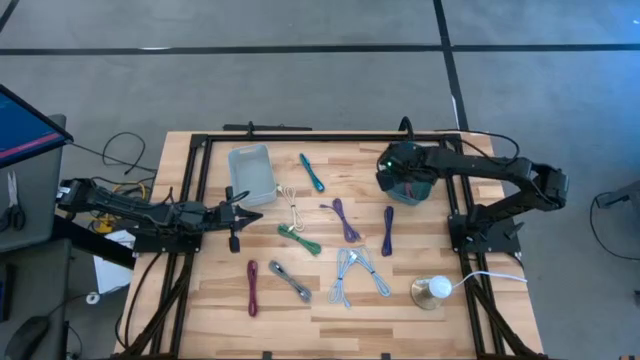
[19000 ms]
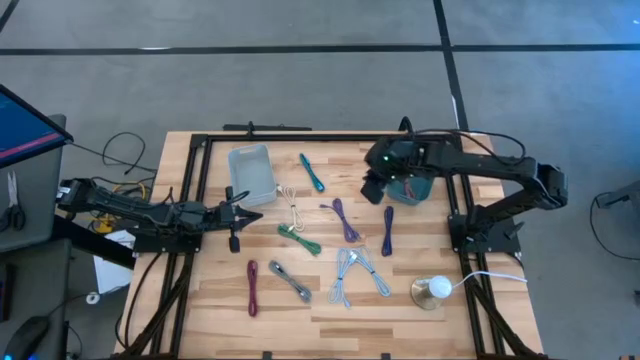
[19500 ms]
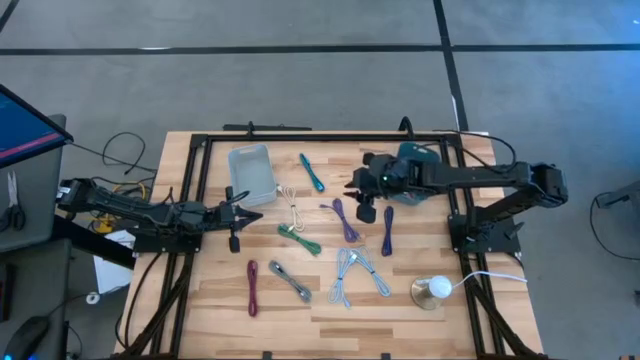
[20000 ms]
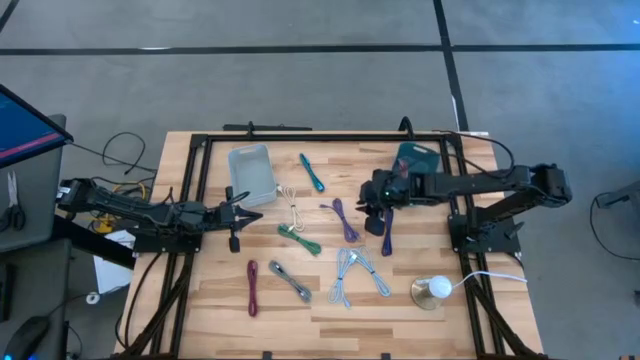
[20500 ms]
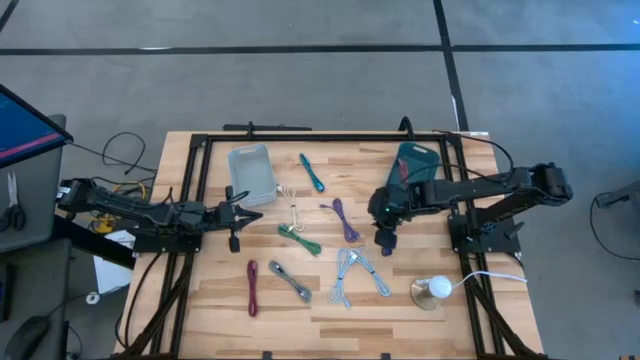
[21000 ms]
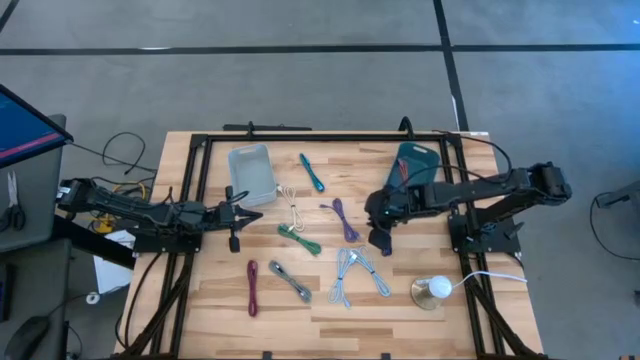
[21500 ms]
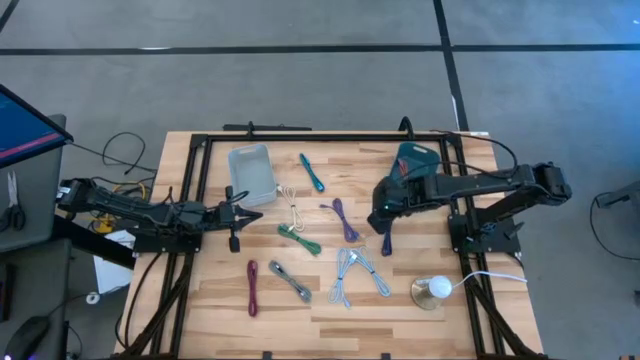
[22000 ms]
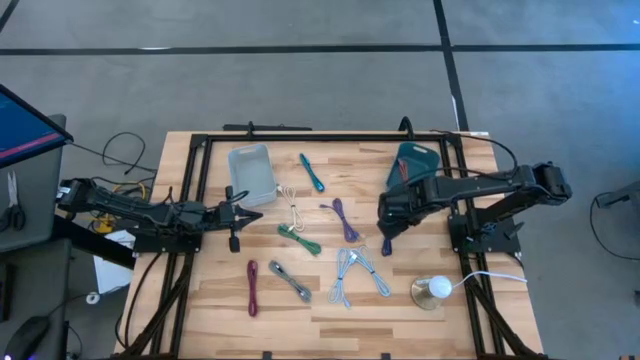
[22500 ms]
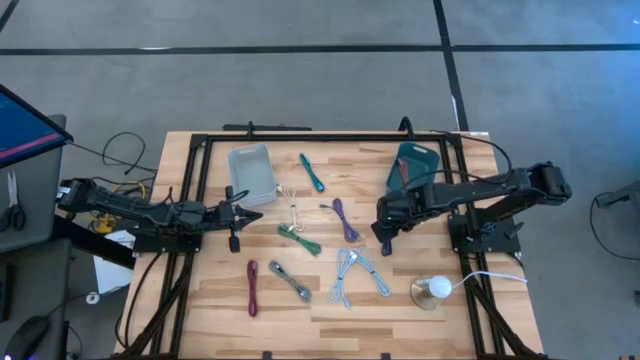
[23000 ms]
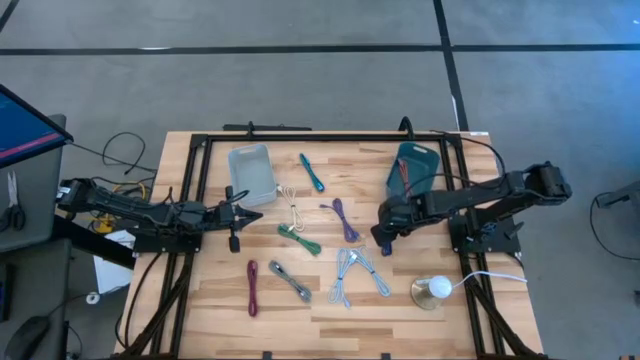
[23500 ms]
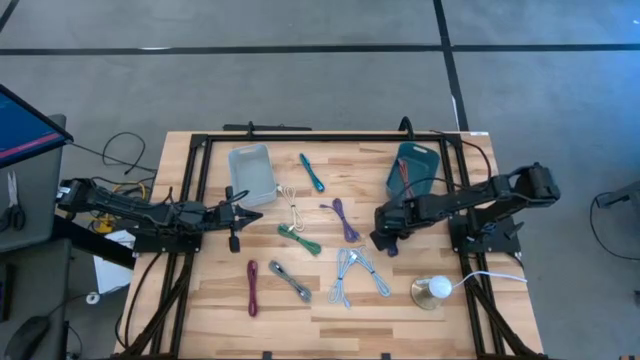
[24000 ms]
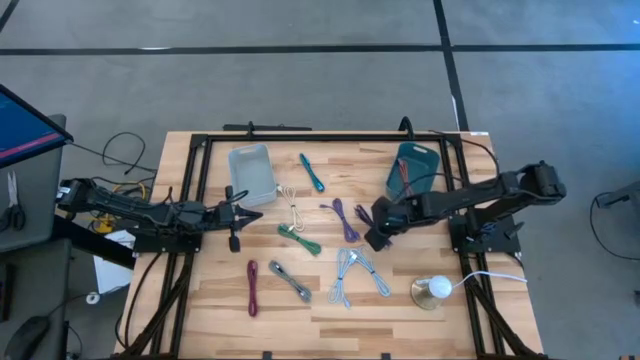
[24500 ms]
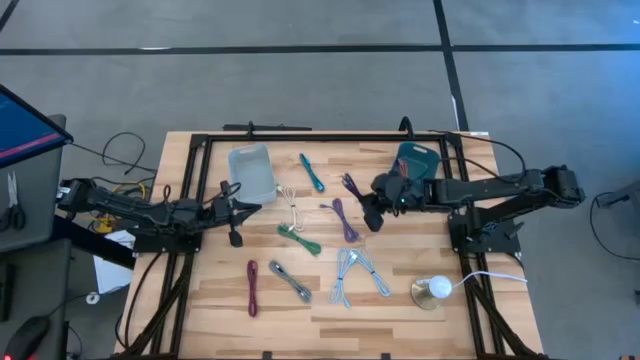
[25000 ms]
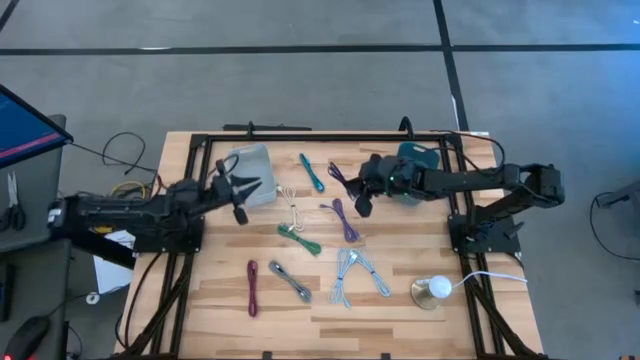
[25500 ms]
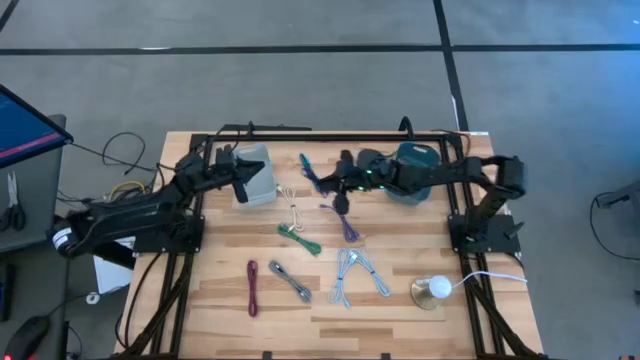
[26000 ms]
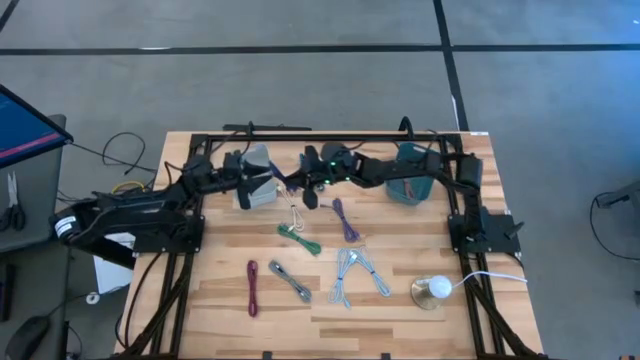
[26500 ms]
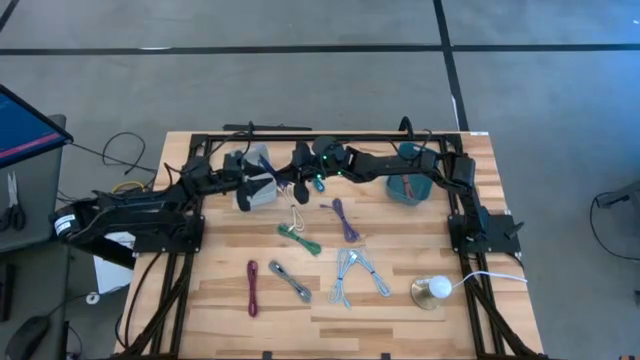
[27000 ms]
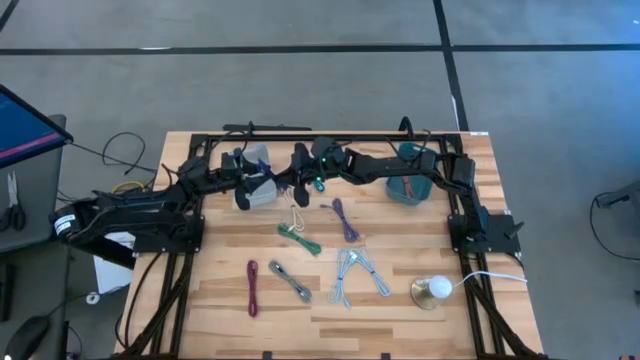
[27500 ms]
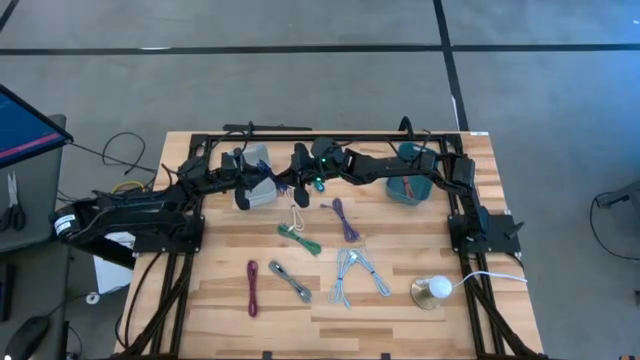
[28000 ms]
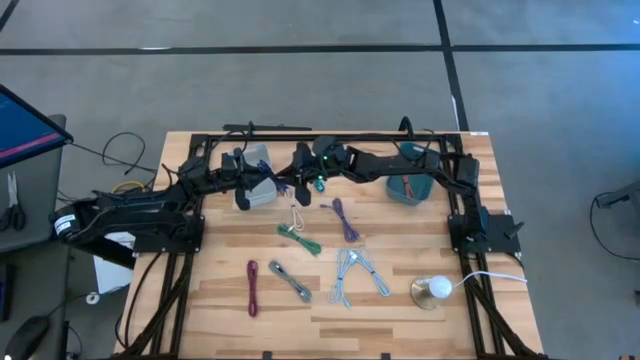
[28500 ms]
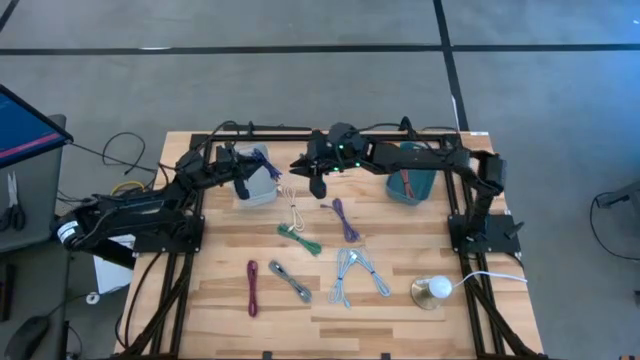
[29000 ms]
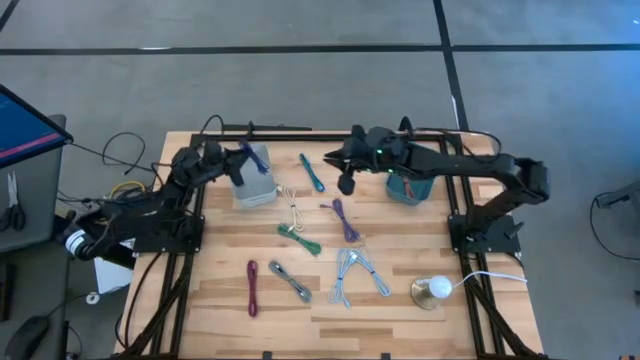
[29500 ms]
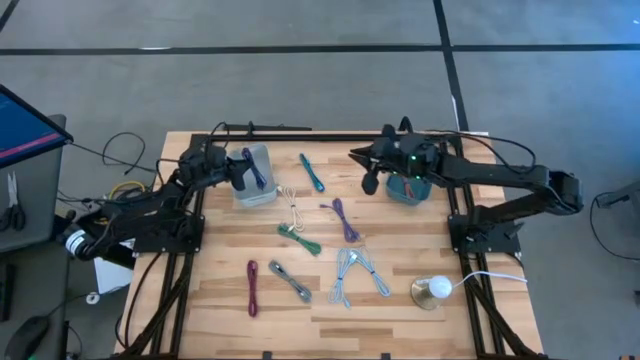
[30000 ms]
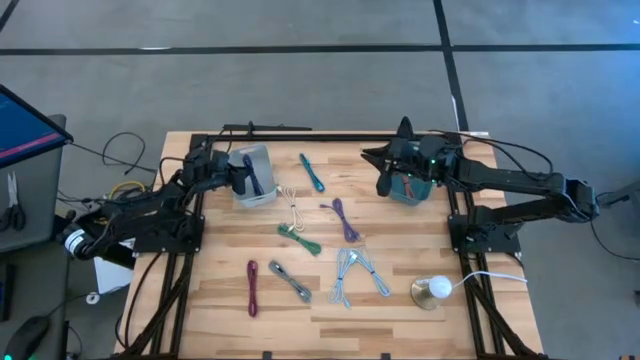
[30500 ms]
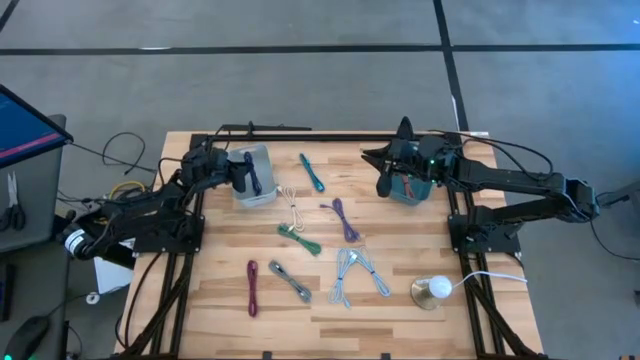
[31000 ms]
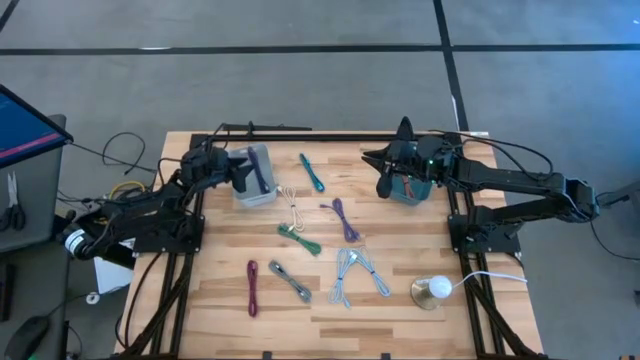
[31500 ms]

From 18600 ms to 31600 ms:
Task: Pick & Place USB Port
Put the purple patterned USB cable into the gray bin

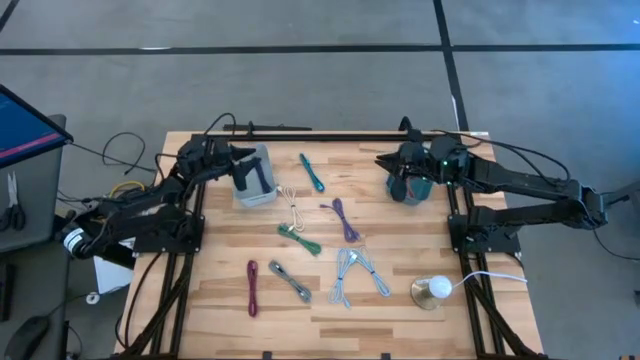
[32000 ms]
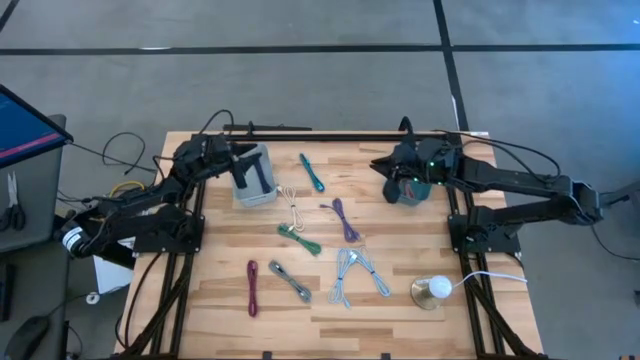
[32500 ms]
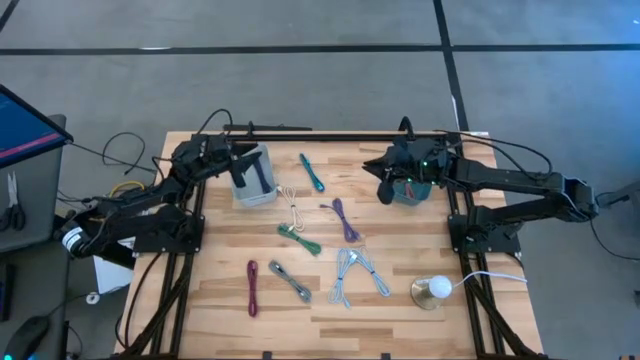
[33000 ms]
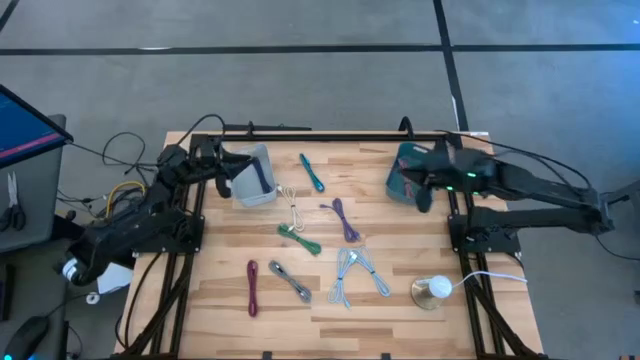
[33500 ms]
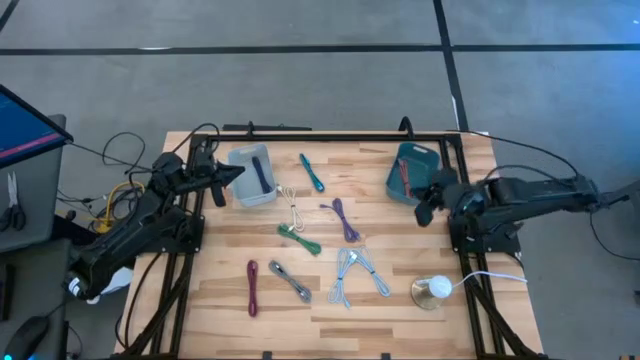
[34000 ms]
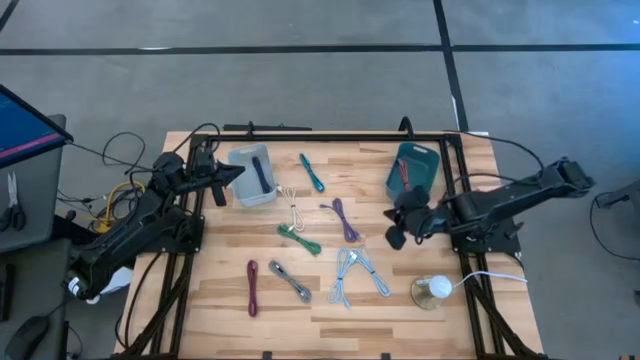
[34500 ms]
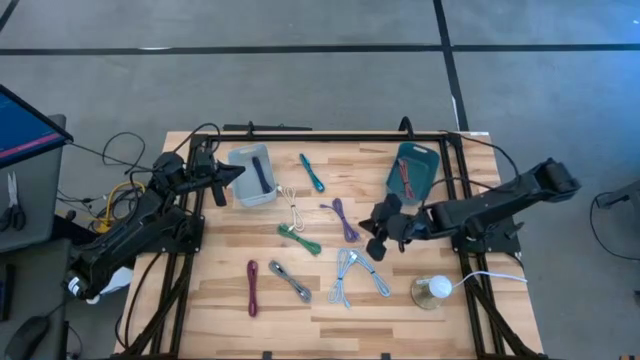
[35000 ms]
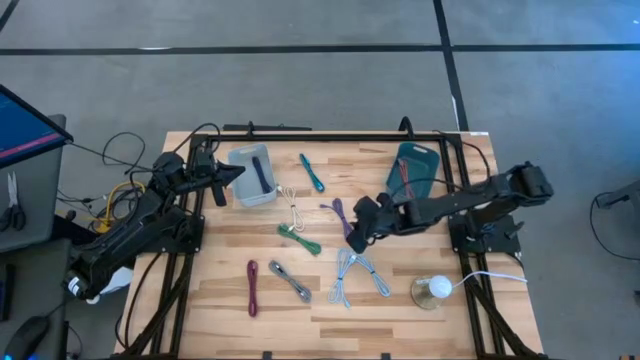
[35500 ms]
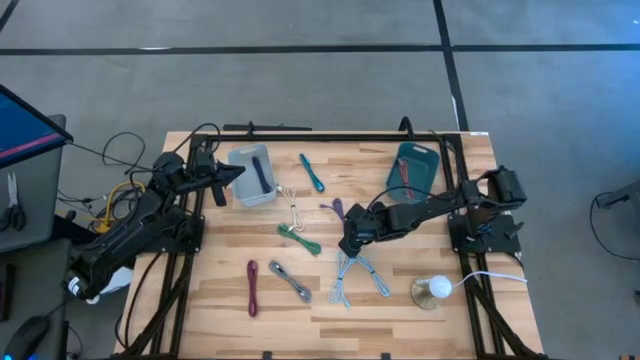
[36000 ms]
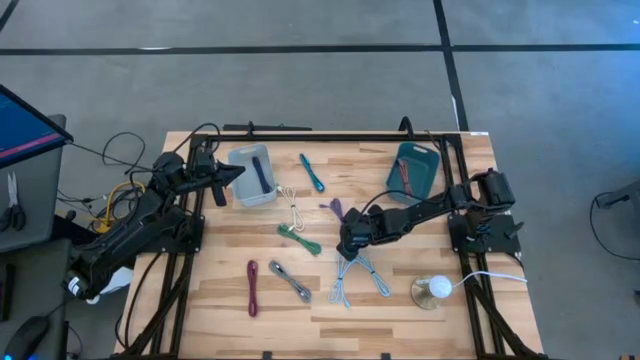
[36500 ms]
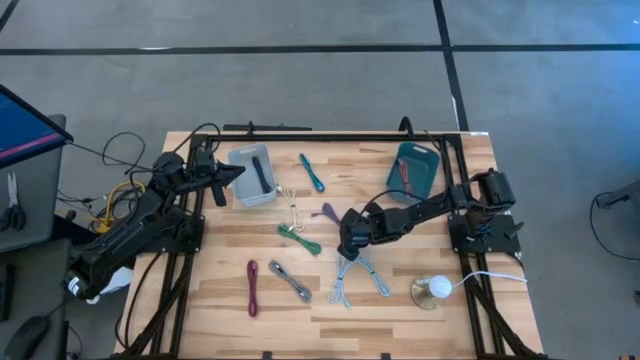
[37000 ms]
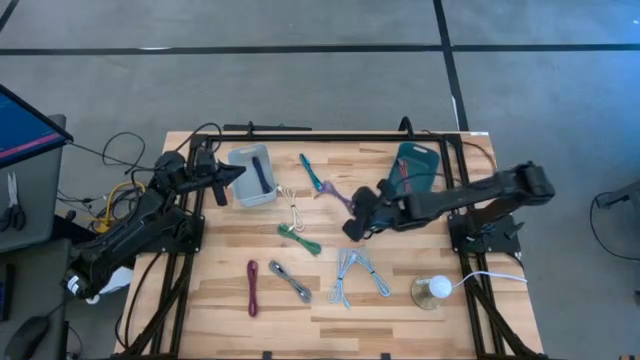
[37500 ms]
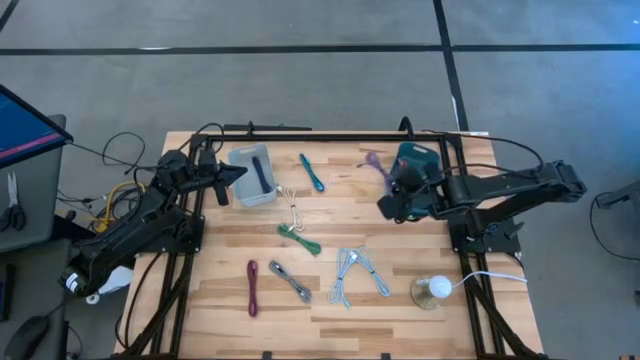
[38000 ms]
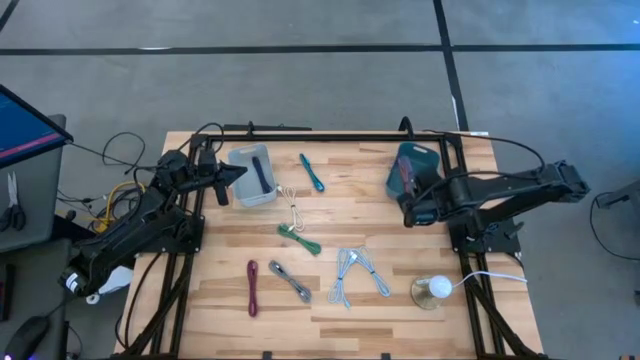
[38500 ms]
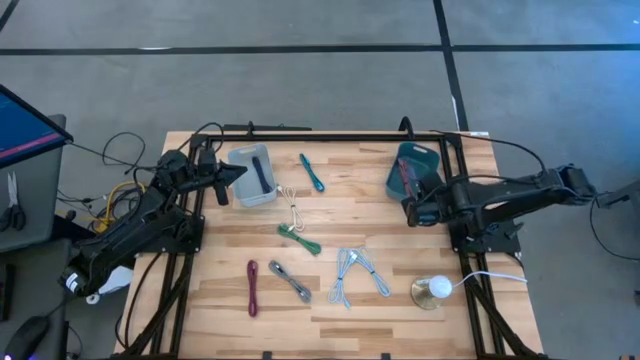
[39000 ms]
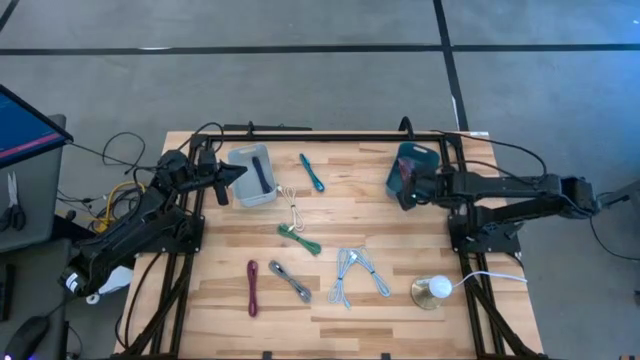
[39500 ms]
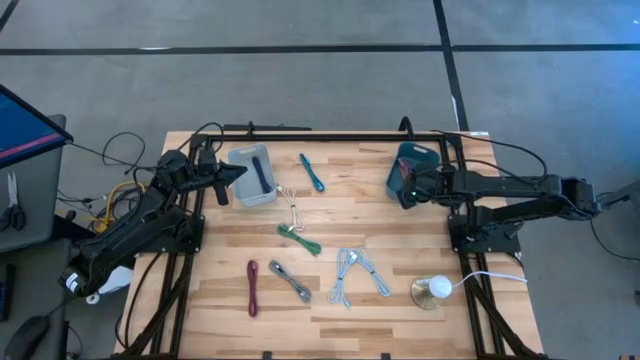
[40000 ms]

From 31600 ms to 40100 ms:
Put the purple USB cable into the blue bin

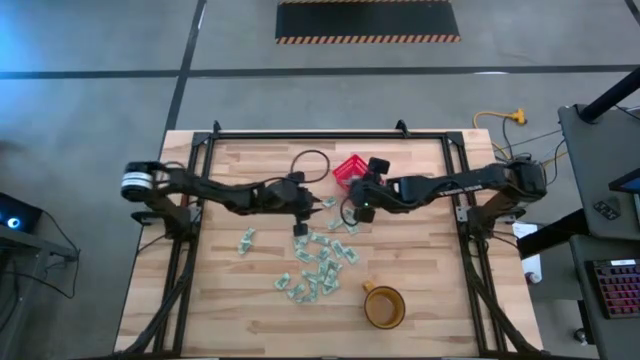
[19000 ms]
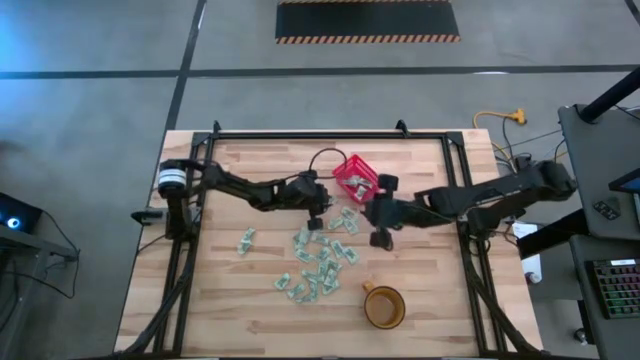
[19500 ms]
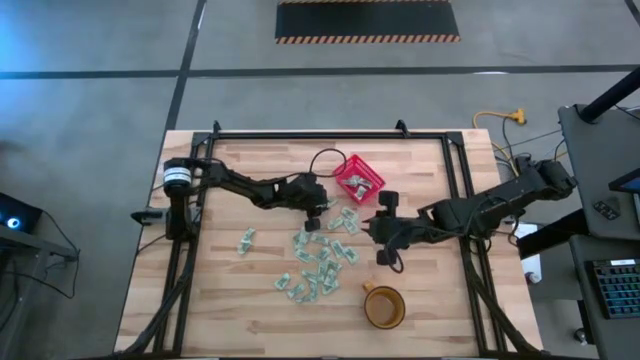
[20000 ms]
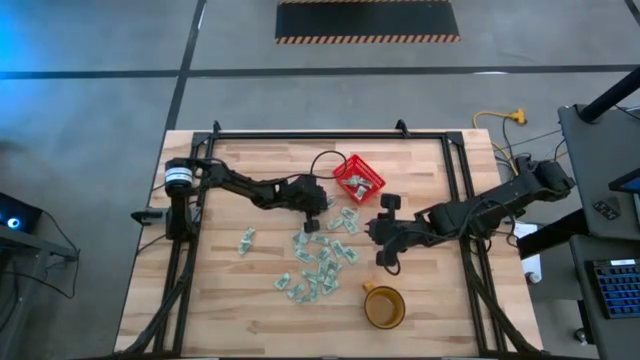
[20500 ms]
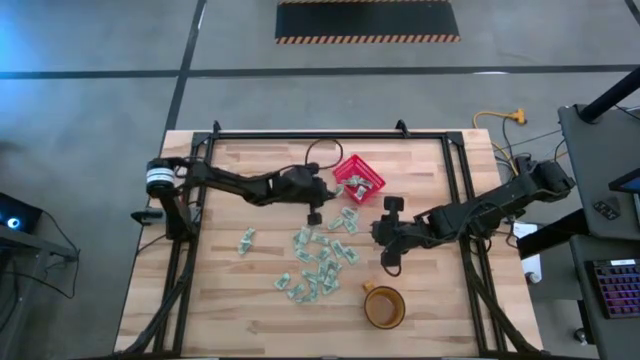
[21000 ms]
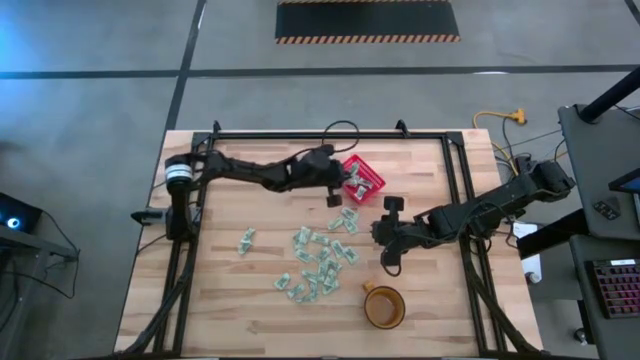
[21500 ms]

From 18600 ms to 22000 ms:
Task: Pick and place Stevia / Truvia into bins
Put the stevia packet into the red basket
